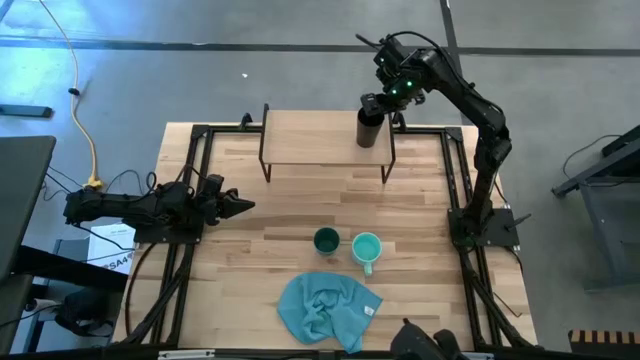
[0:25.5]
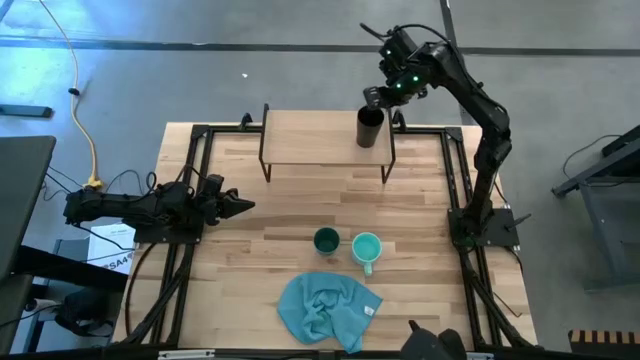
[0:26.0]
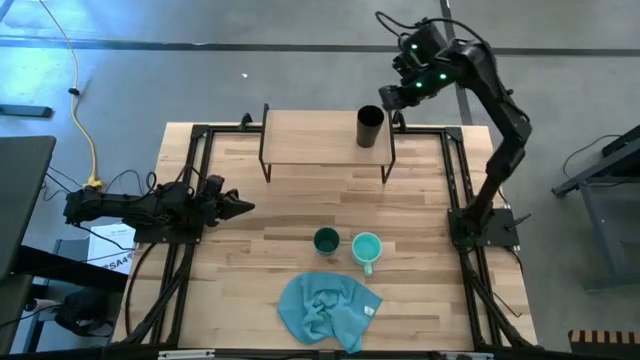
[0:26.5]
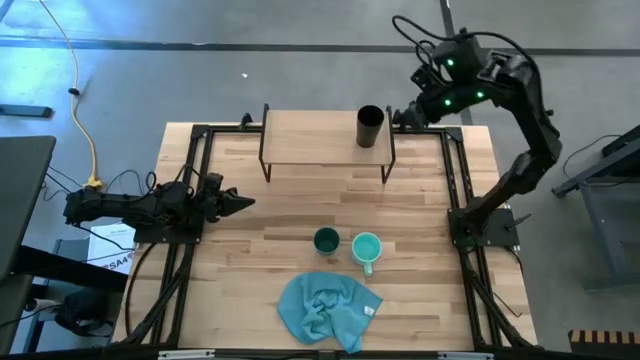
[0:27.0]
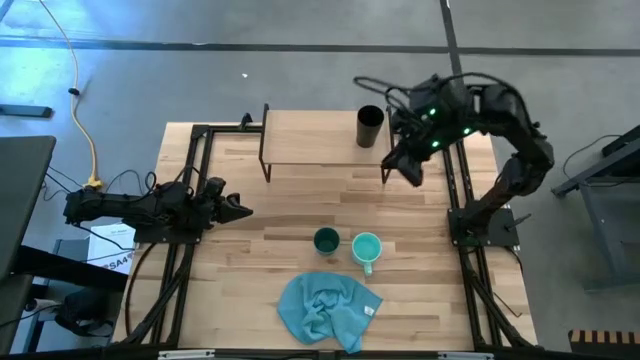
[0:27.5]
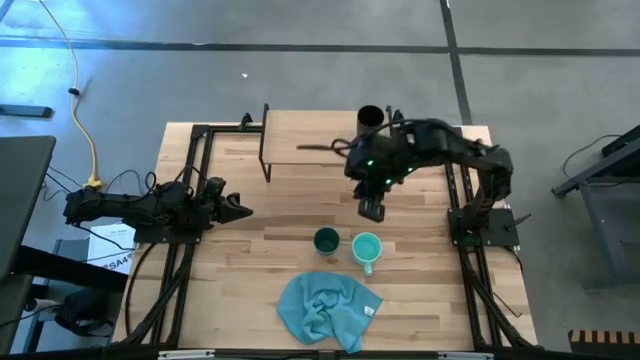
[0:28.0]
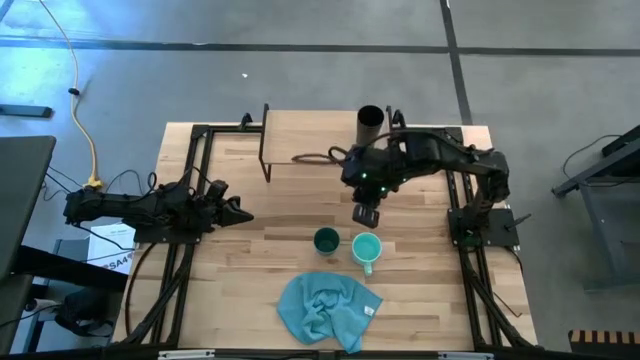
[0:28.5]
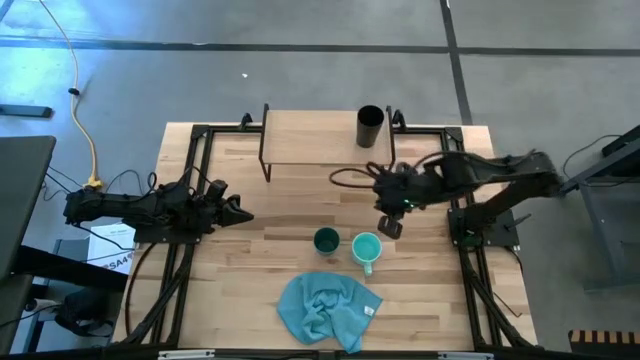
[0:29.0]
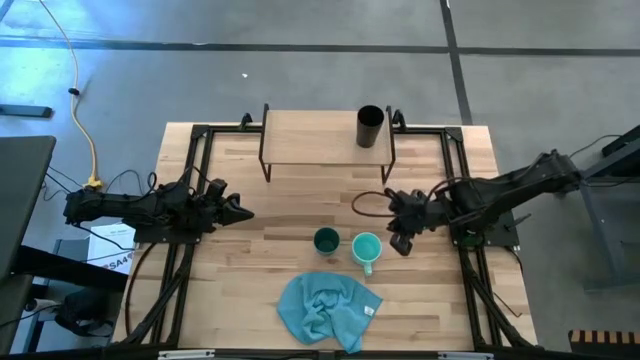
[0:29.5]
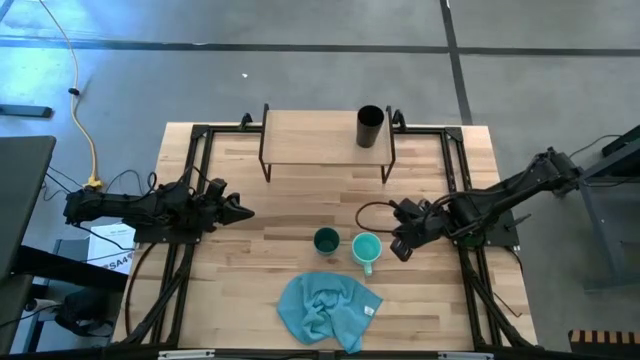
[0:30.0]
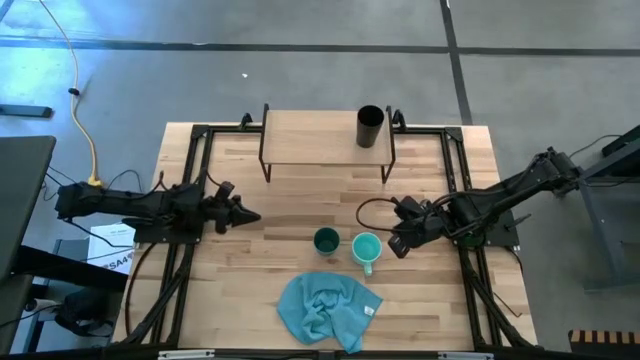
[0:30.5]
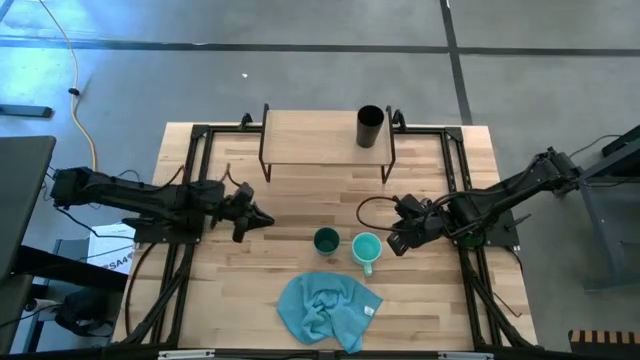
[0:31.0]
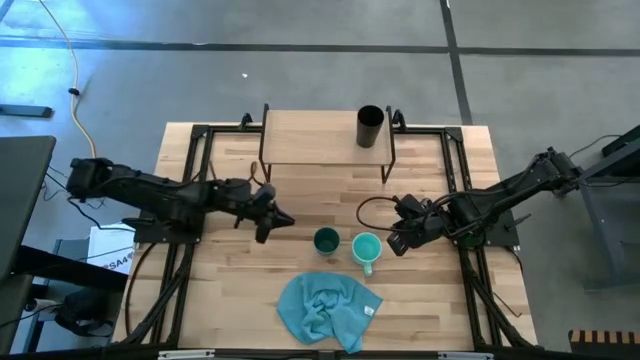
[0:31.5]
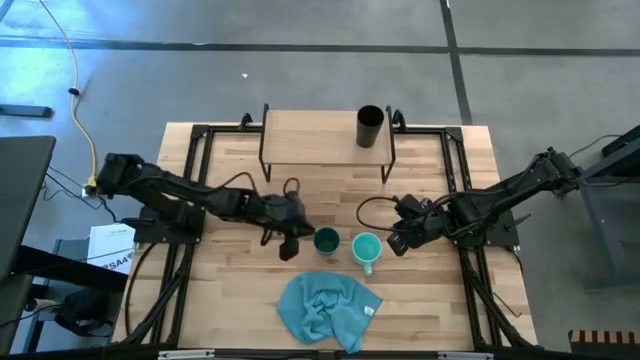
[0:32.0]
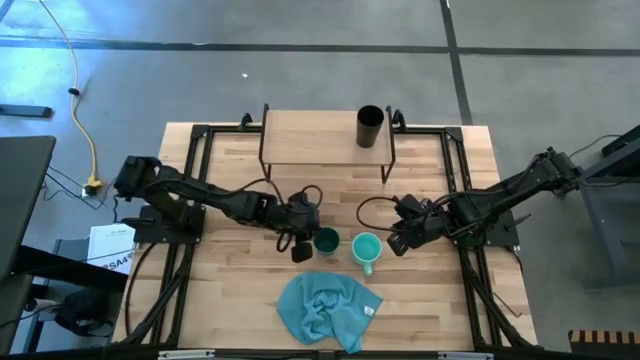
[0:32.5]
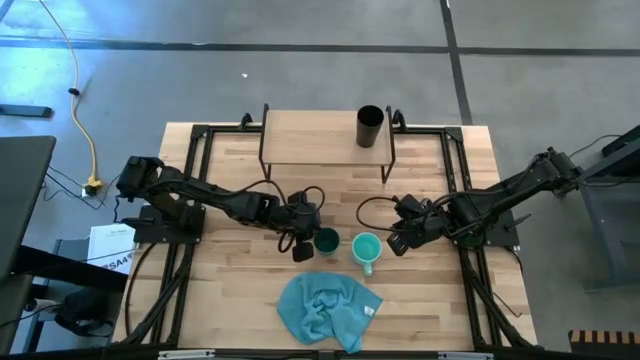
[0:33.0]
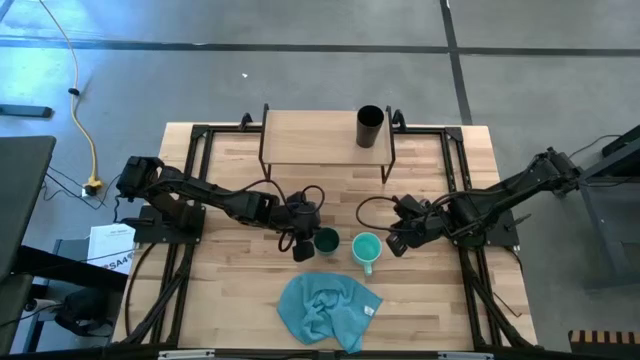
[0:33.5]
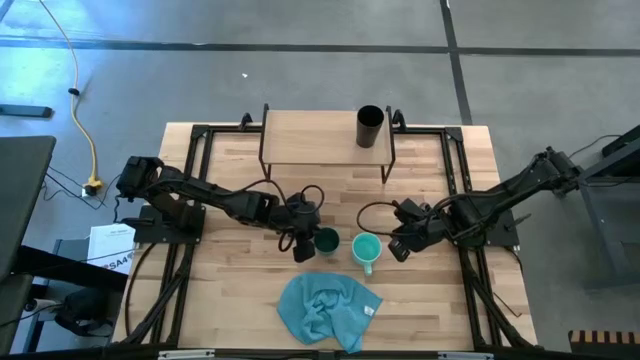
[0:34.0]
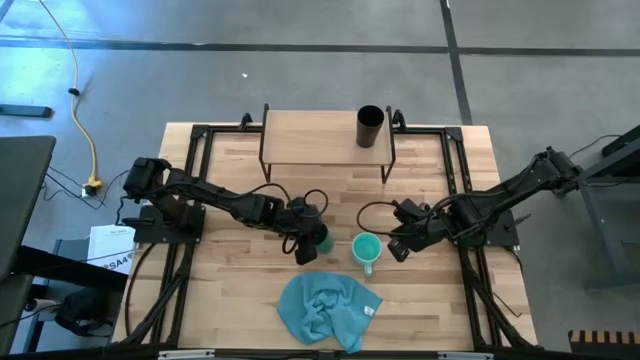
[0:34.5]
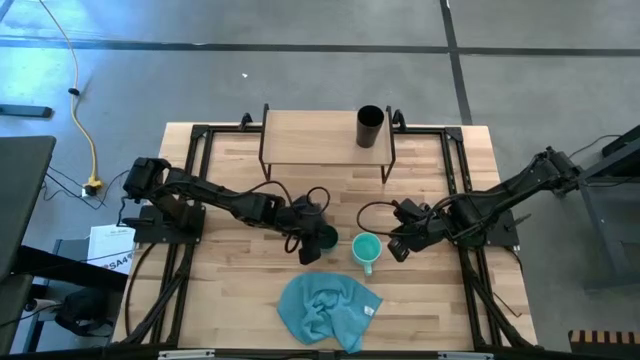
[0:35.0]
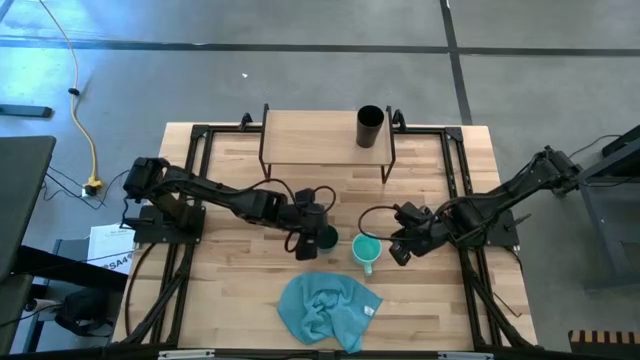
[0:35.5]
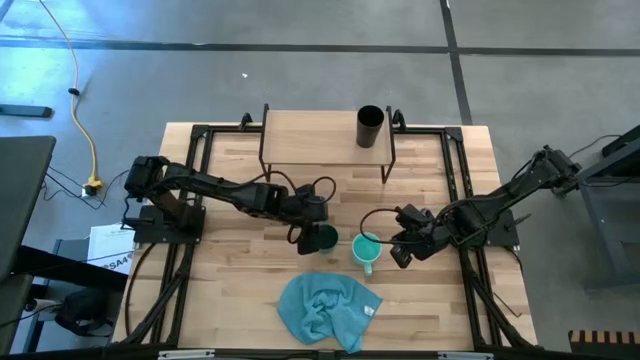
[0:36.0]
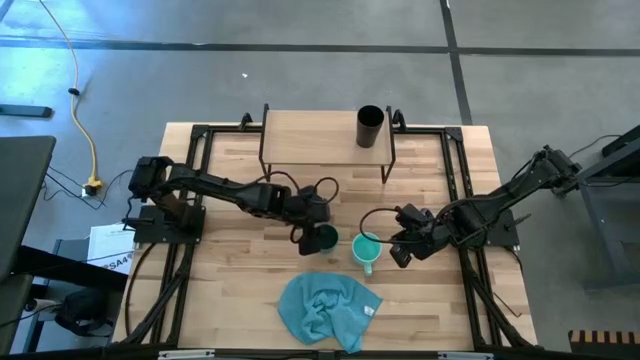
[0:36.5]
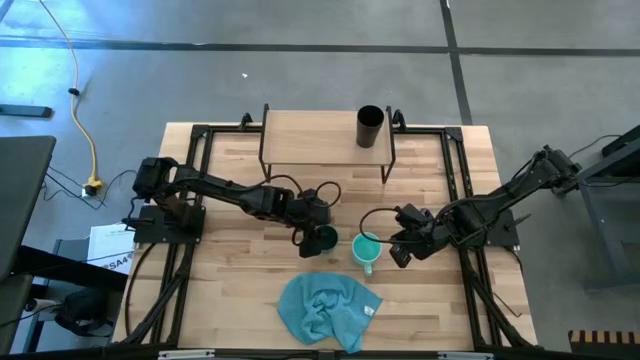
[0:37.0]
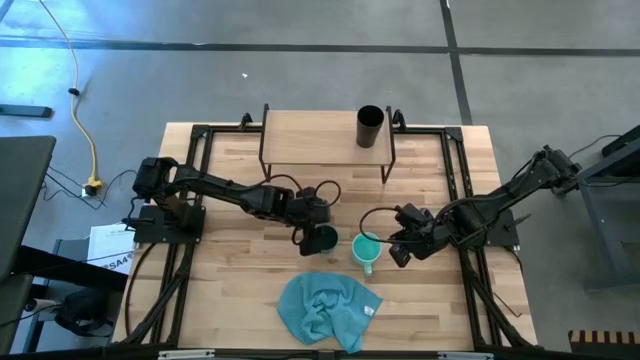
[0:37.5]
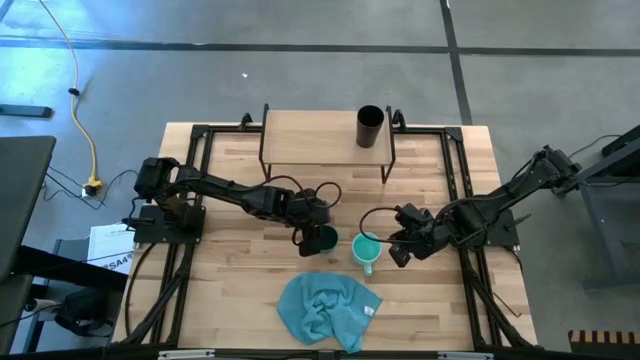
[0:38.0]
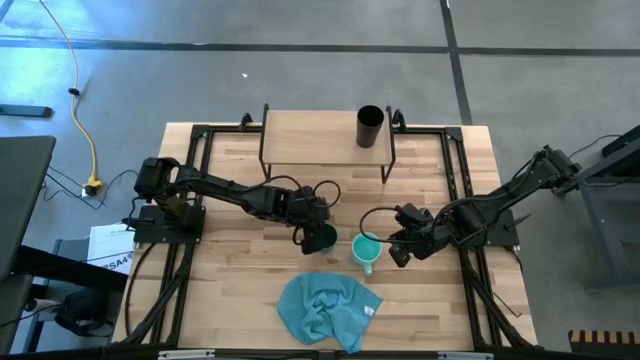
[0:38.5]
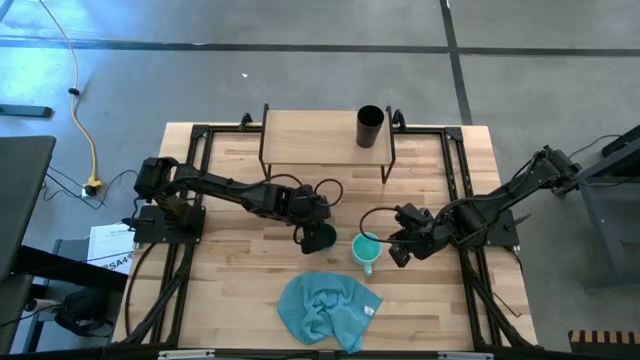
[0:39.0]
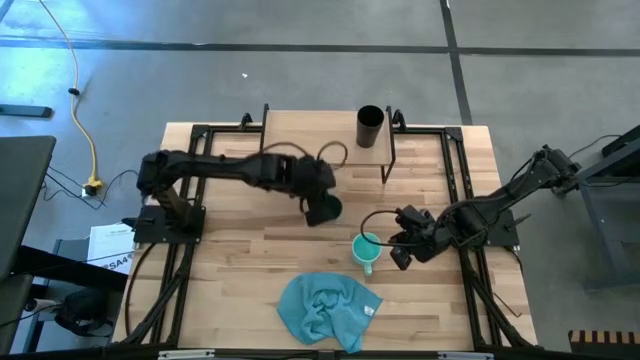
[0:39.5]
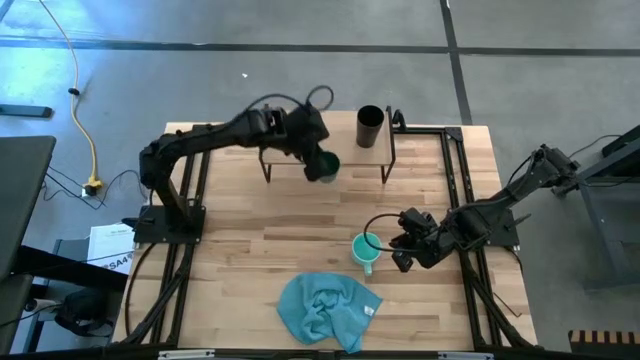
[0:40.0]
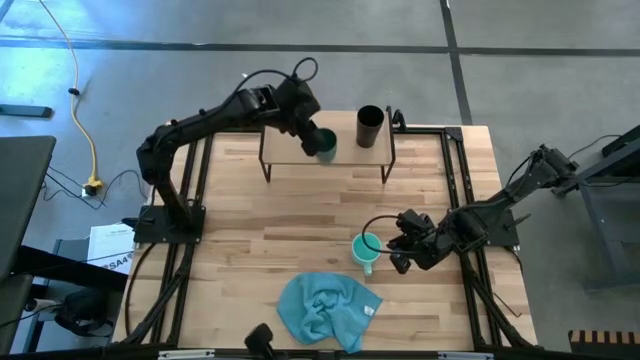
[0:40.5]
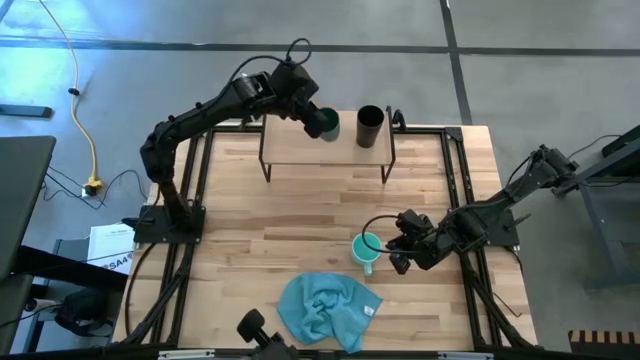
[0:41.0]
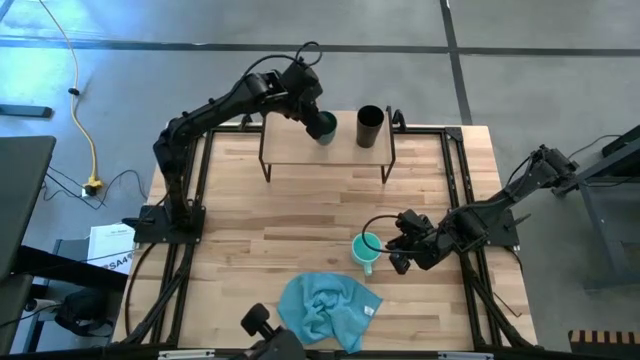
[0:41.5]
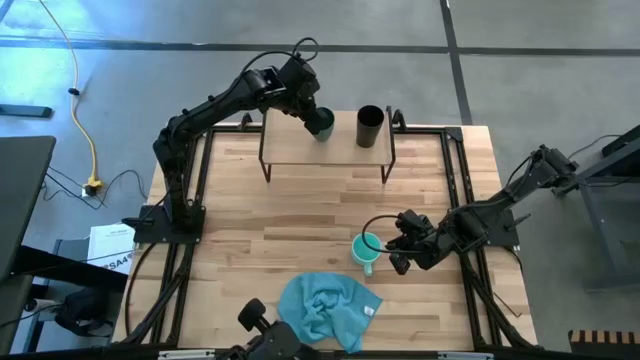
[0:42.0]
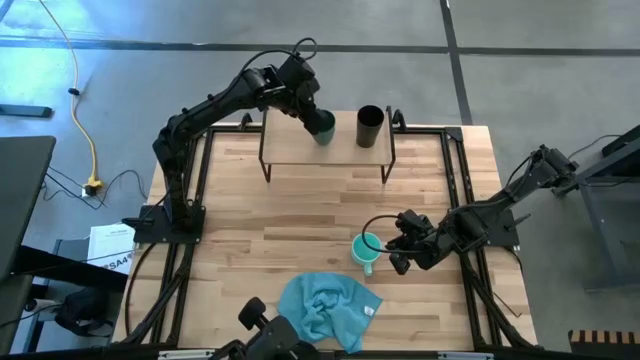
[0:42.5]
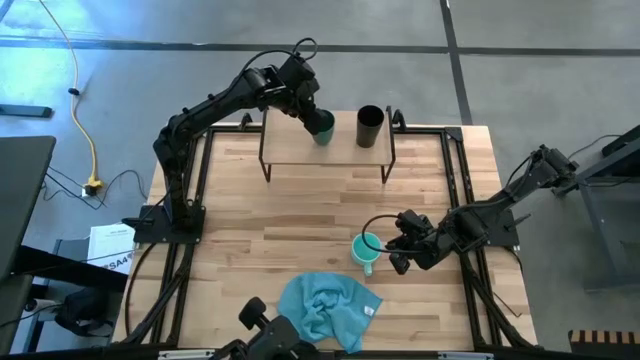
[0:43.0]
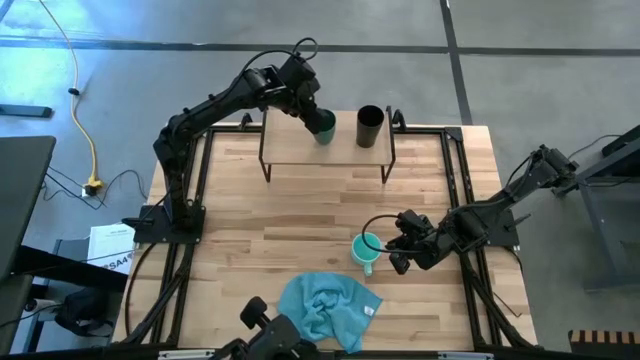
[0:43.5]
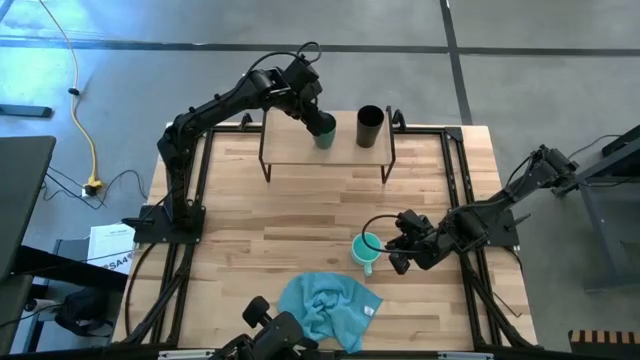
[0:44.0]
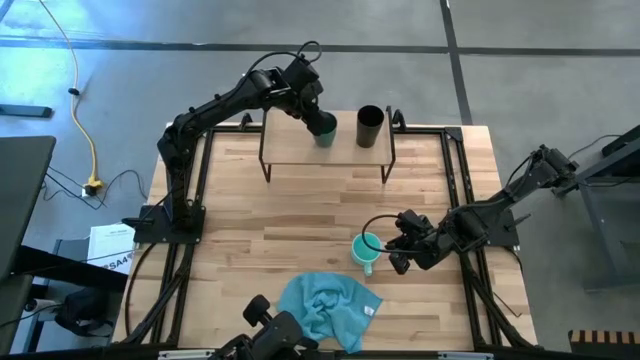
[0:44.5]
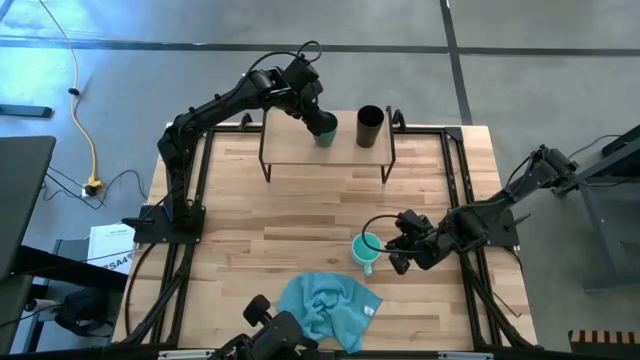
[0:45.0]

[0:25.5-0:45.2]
Task: Stack small to large cups/mugs on shelf
Put the green cup on the shelf
